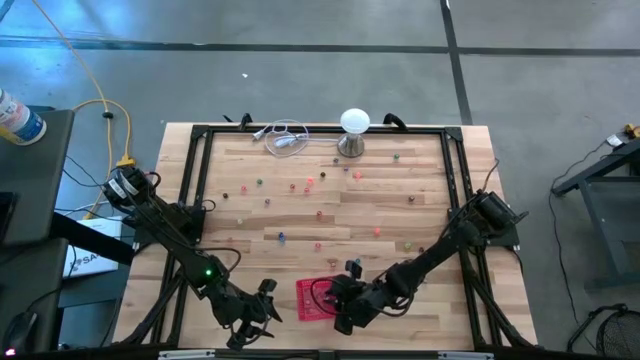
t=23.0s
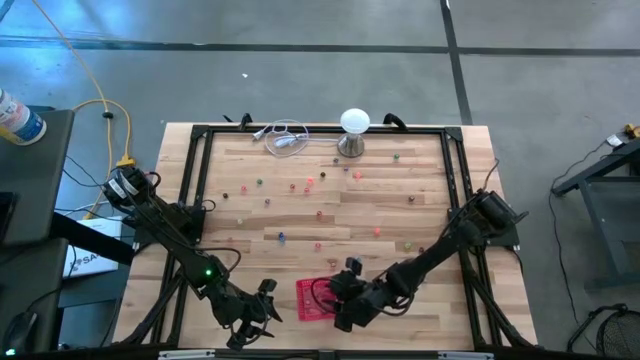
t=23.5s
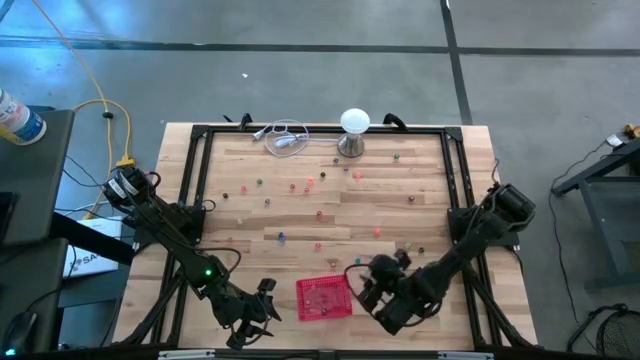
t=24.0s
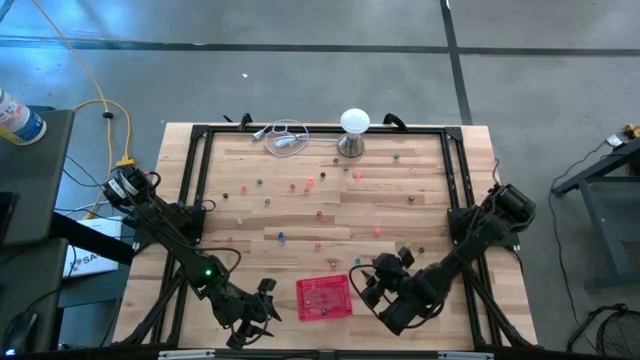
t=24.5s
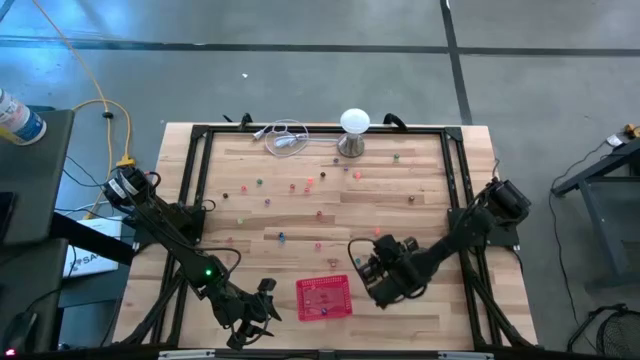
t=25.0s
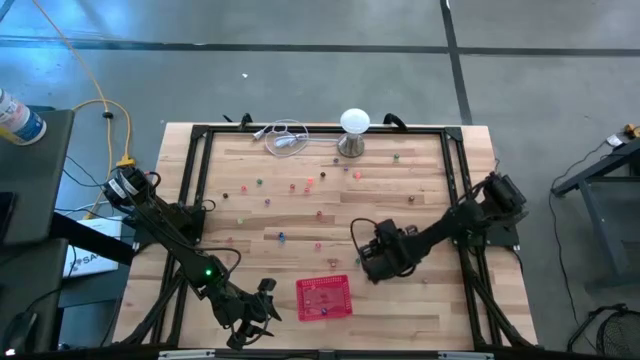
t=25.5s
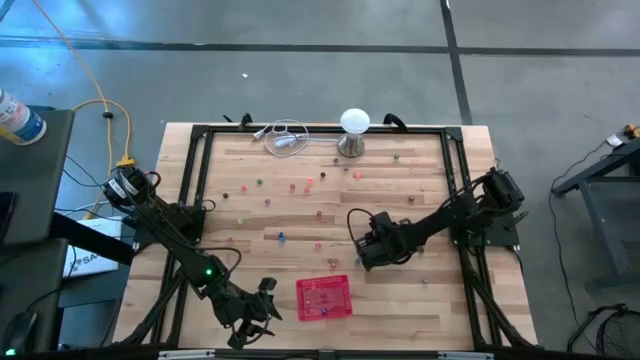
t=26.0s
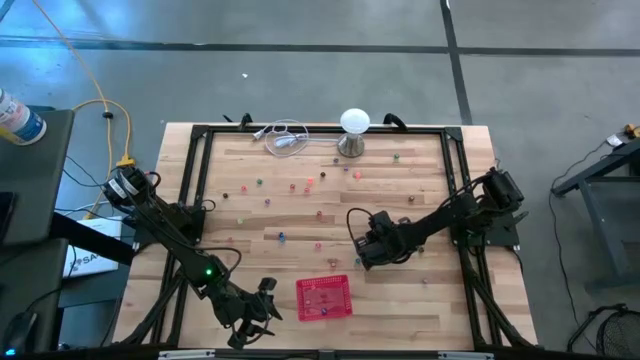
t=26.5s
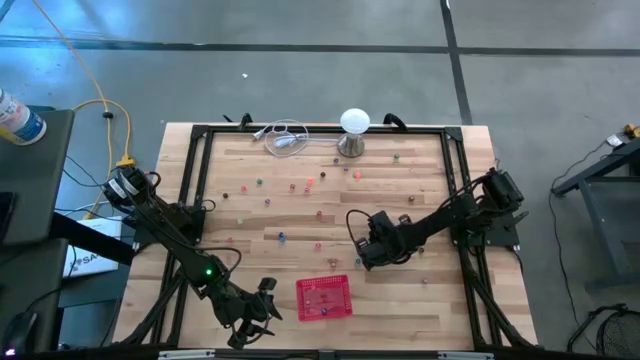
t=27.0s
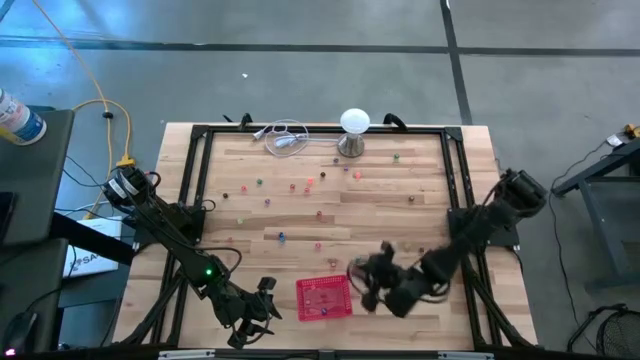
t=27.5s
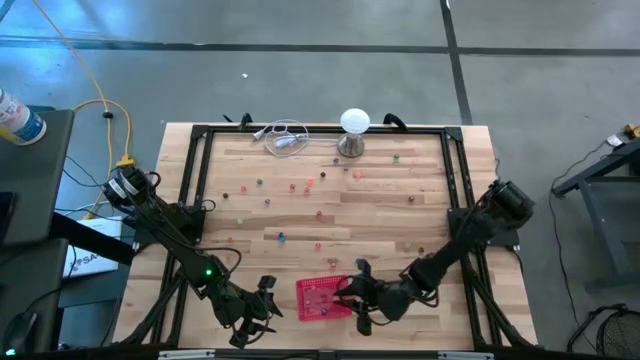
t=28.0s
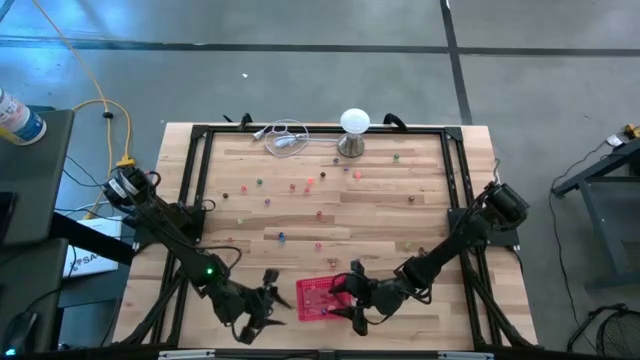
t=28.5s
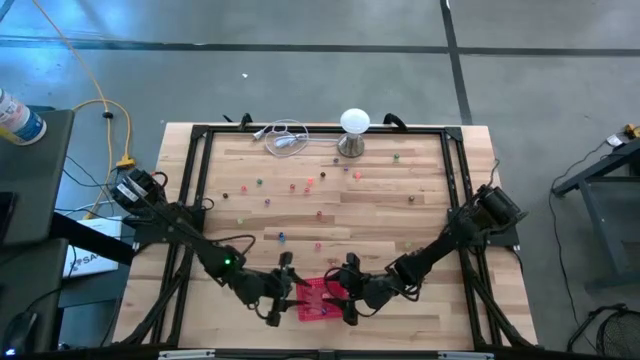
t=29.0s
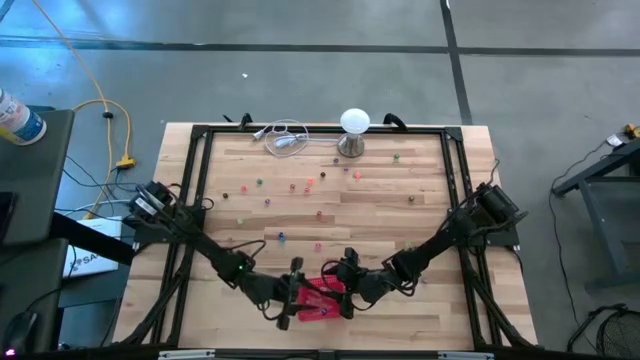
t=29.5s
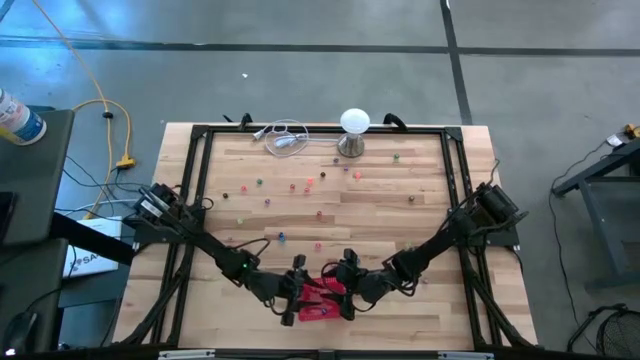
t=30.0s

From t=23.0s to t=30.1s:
Task: Pick & Place Dice
Put the orange dice into the red bin

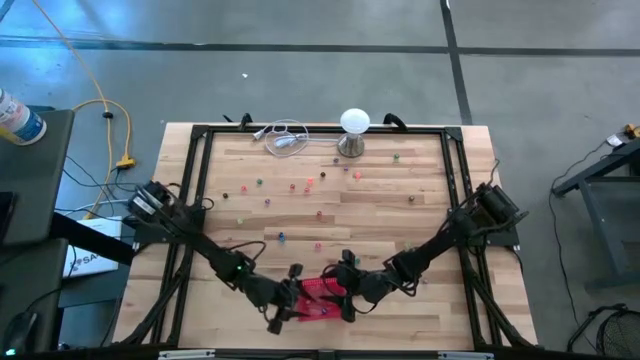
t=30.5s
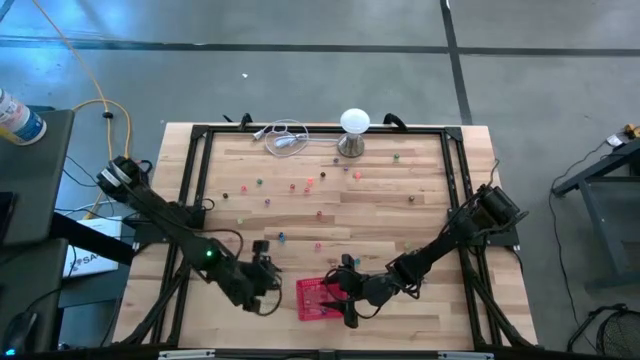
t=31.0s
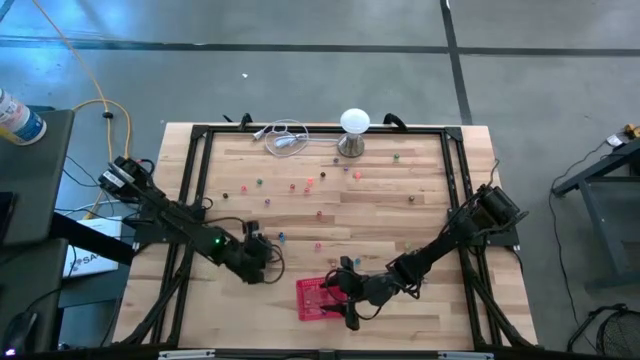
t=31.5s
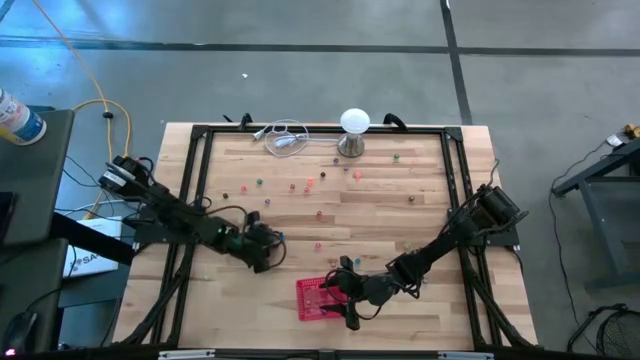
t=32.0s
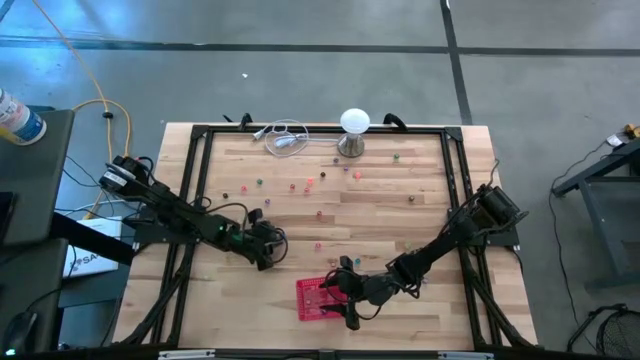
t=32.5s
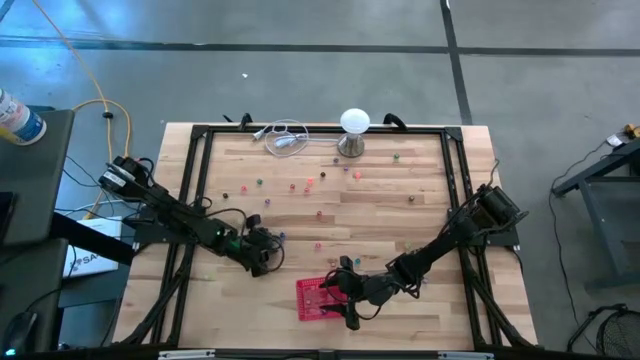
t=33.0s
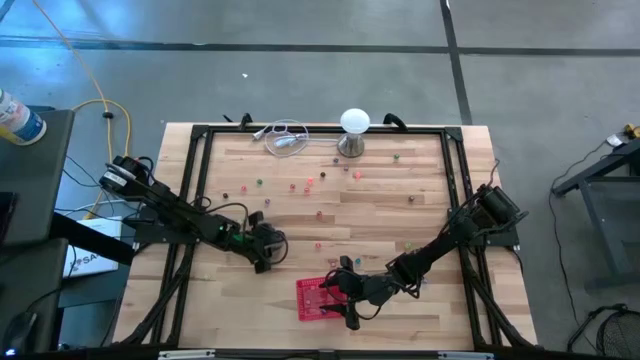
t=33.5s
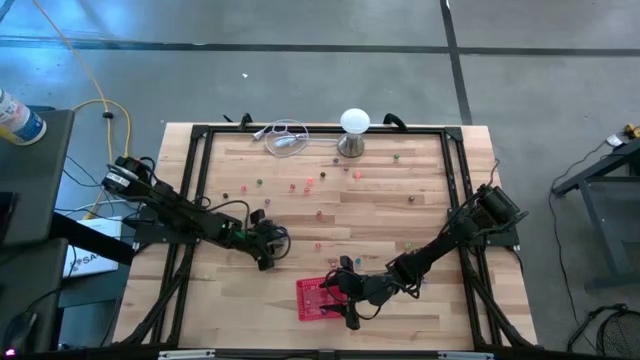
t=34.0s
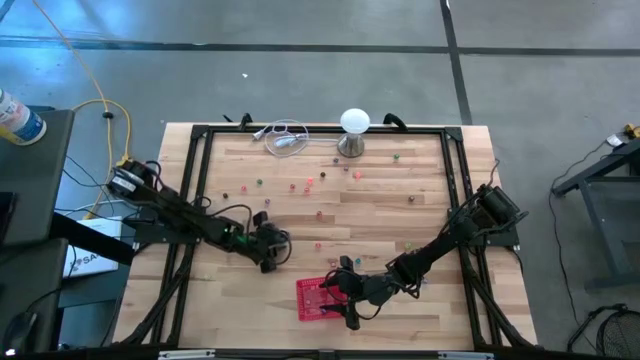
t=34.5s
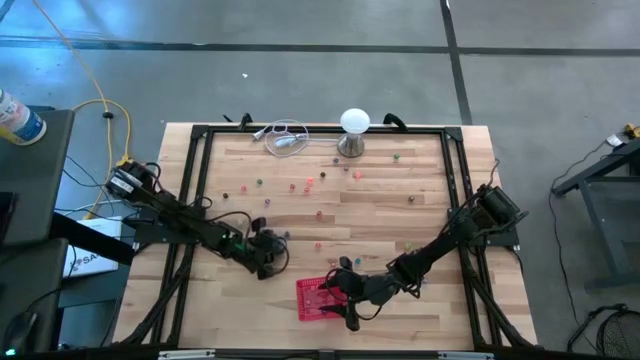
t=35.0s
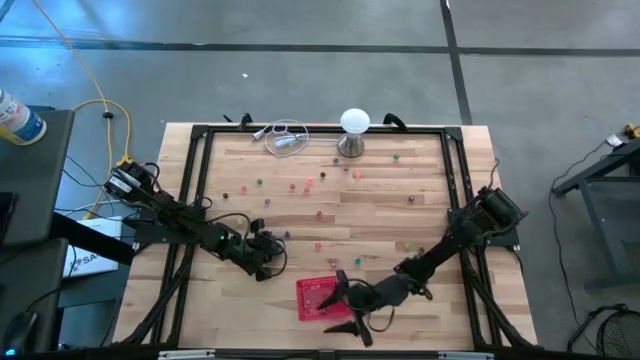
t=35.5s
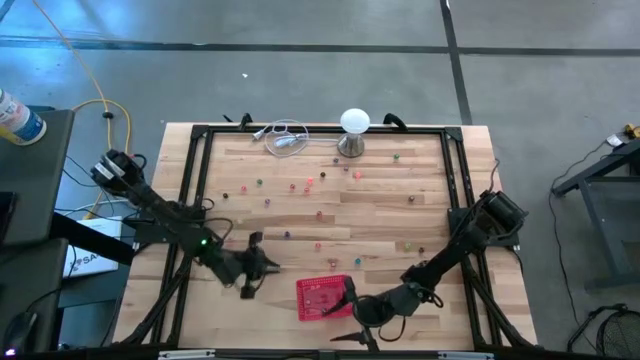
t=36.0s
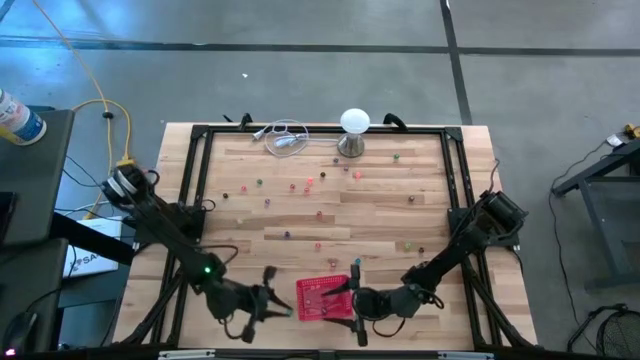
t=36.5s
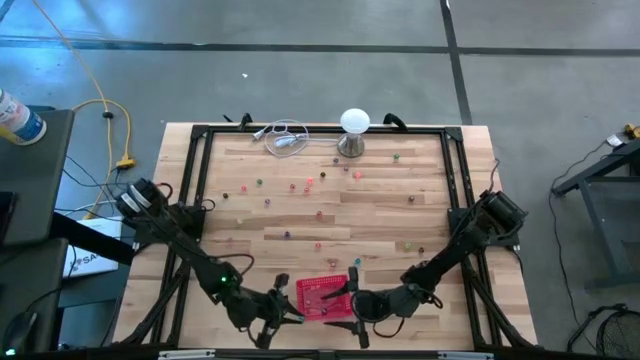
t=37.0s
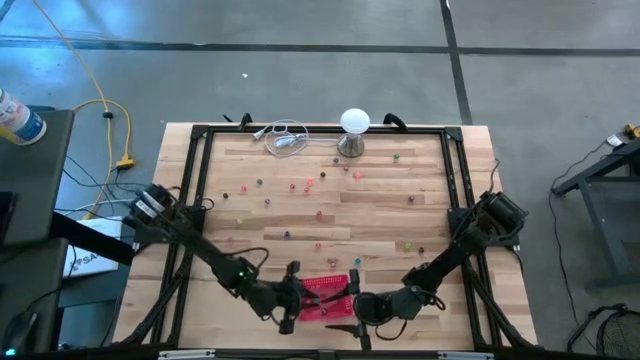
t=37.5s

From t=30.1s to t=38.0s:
Put the light blue dice into the red bin

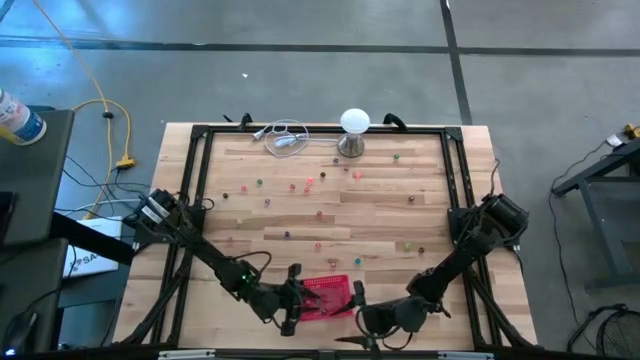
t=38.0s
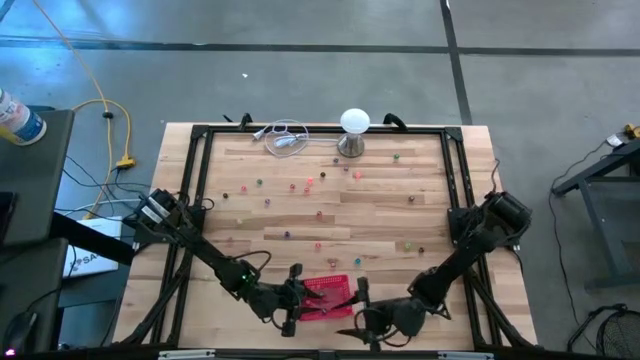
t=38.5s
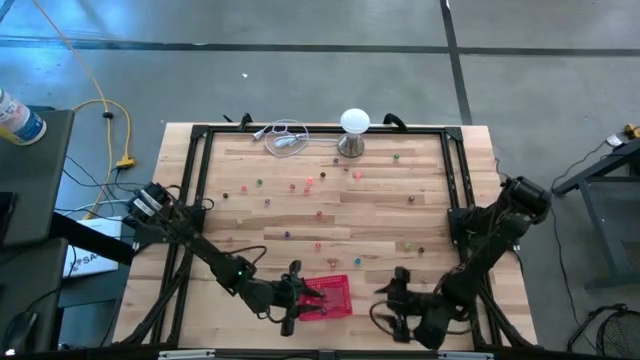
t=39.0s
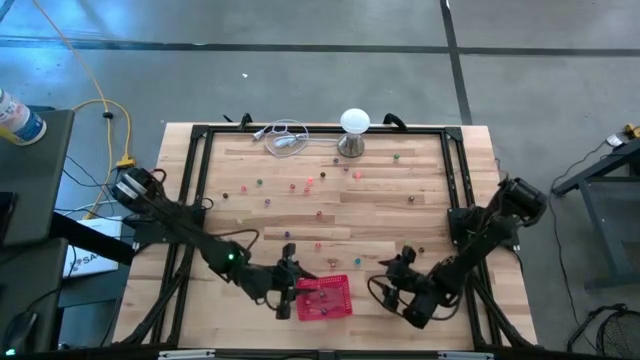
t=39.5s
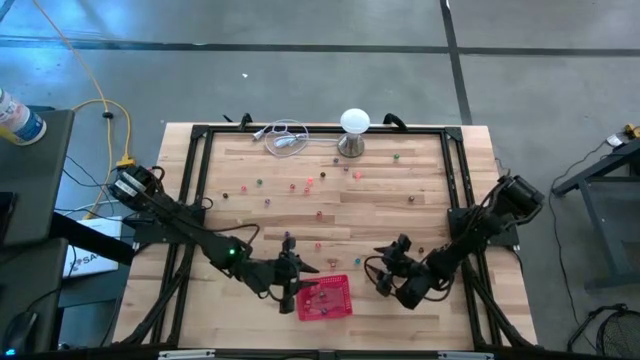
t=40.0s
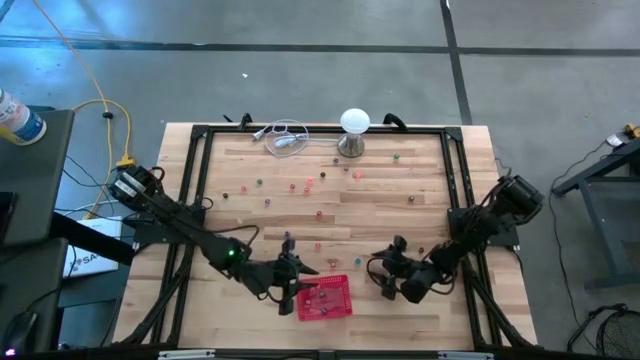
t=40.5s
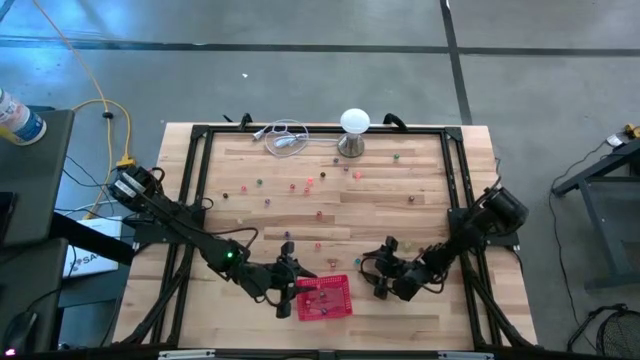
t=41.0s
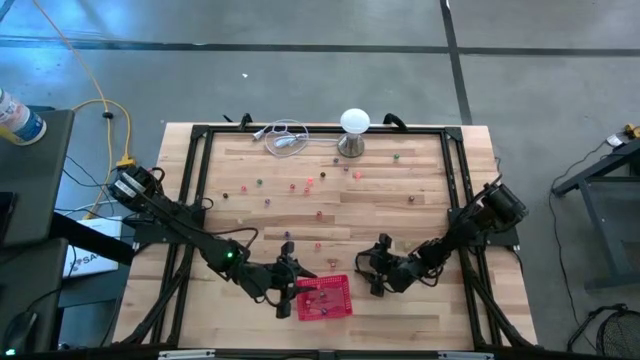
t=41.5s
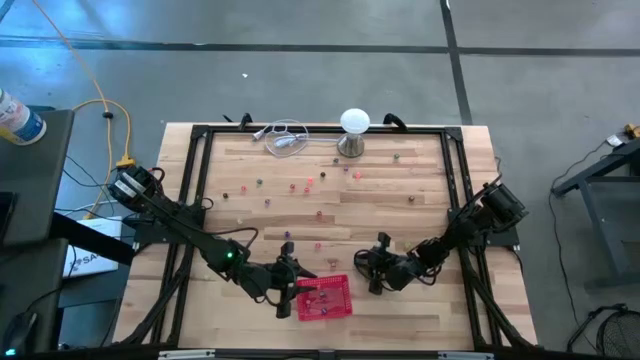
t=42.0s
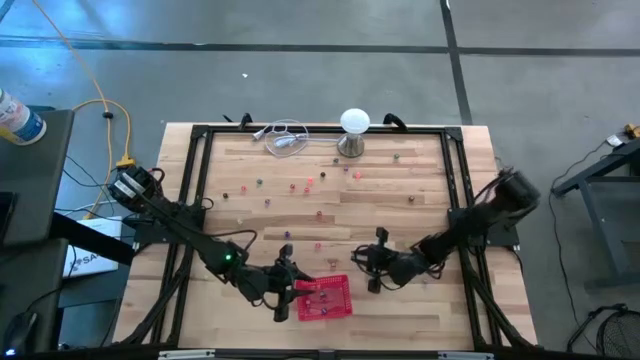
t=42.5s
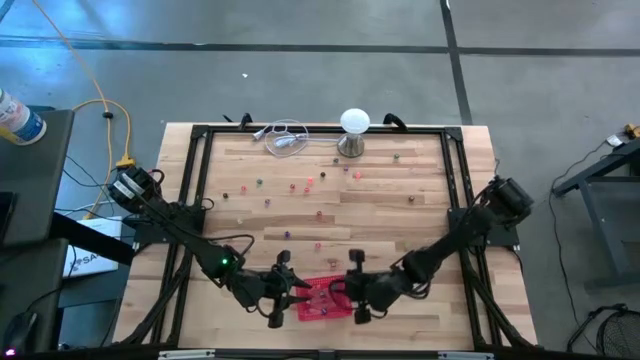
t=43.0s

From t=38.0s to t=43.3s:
Put the light blue dice into the red bin

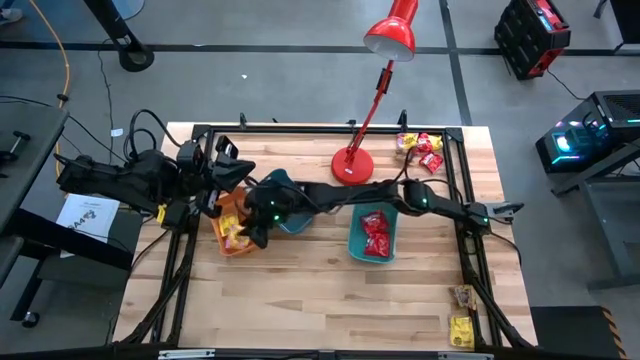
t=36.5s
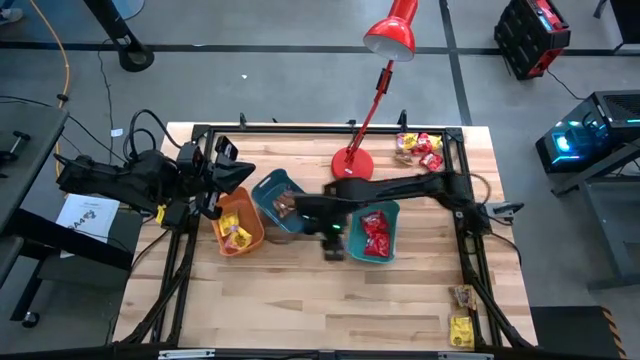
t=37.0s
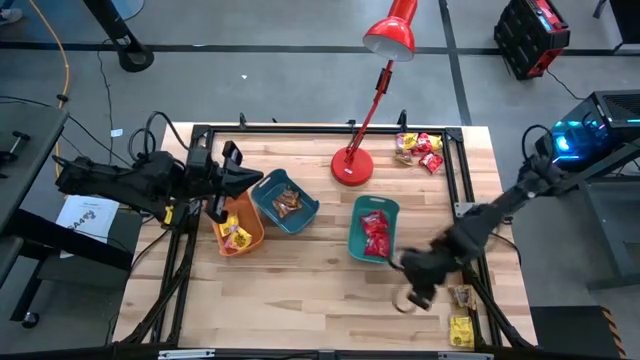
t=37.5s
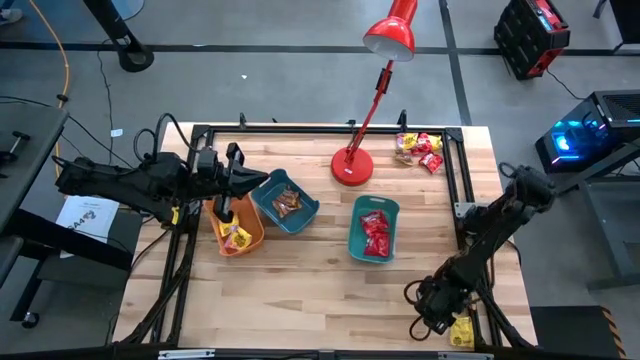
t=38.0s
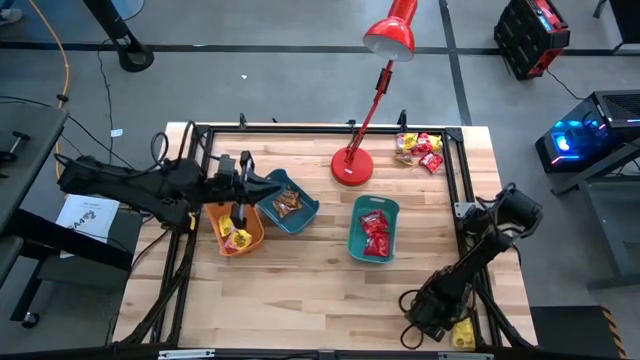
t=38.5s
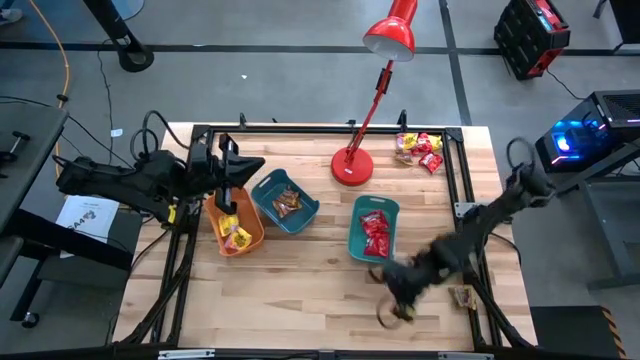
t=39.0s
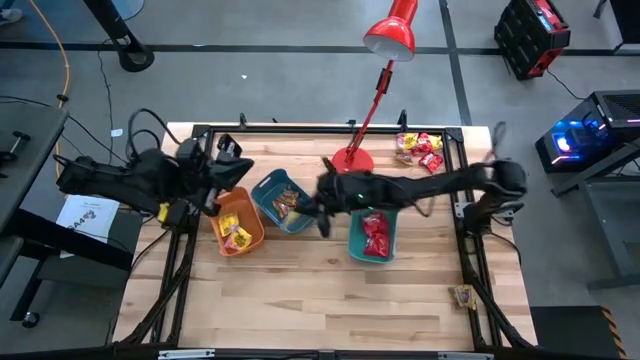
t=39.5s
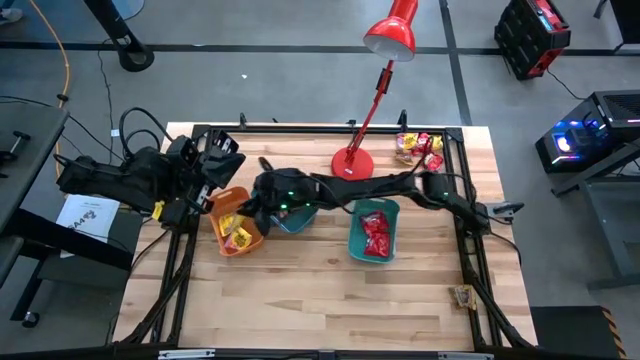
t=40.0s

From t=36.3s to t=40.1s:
Task: Sort candy
Put the bottom right yellow candy into the orange bin
